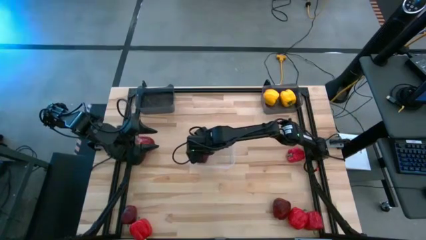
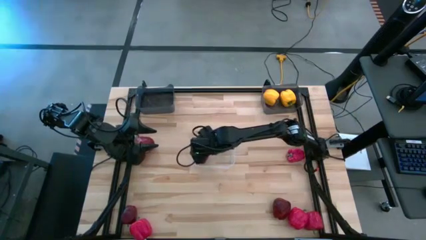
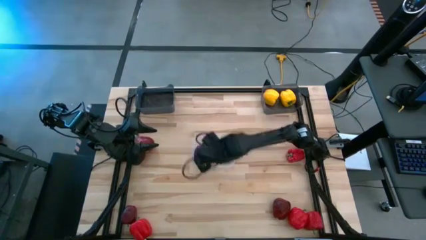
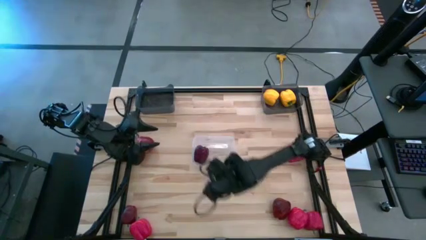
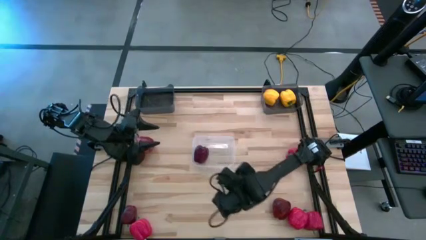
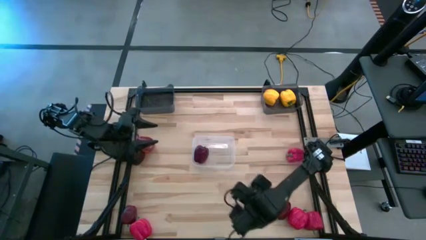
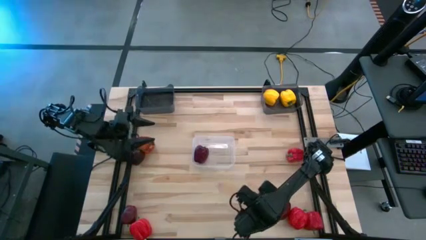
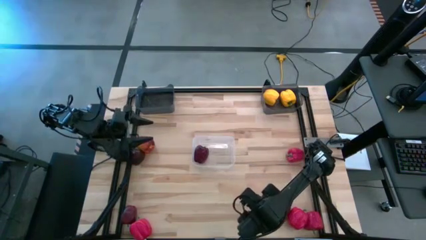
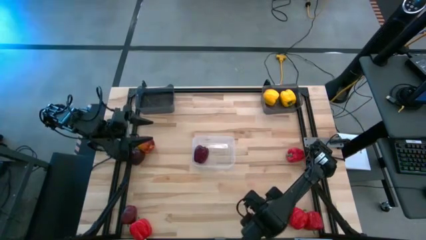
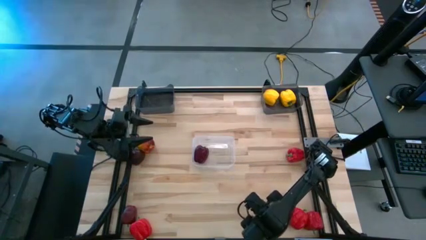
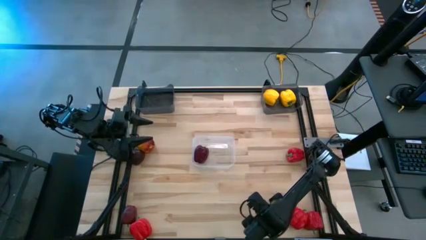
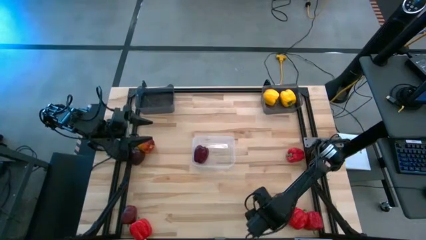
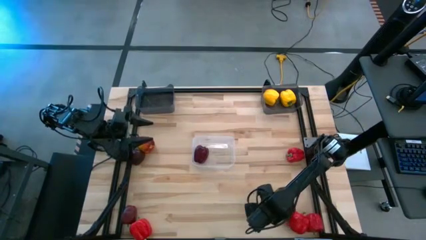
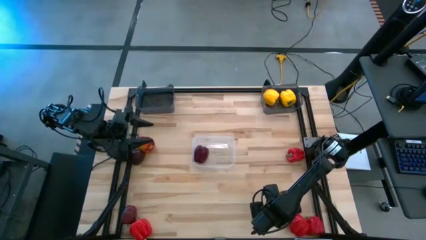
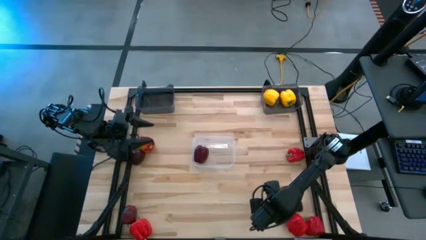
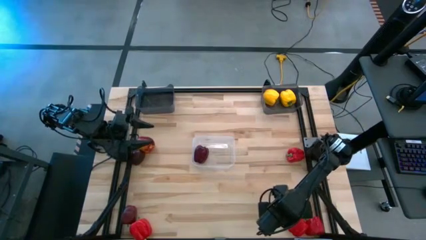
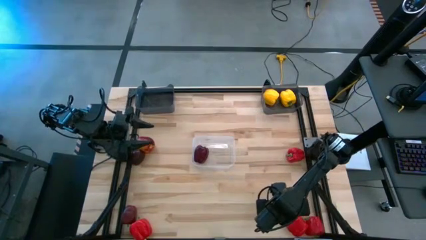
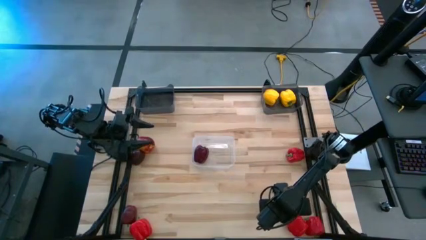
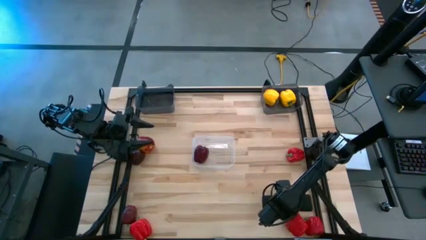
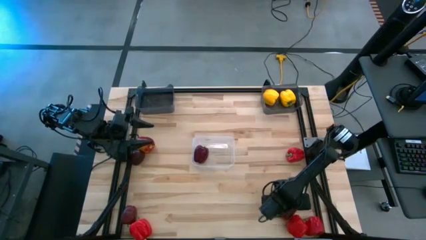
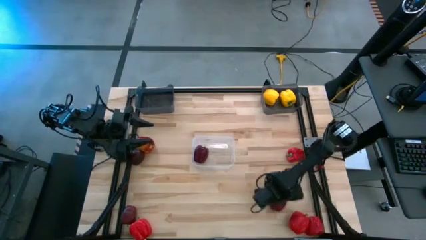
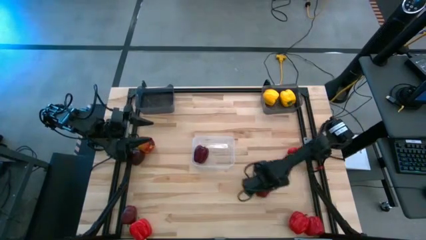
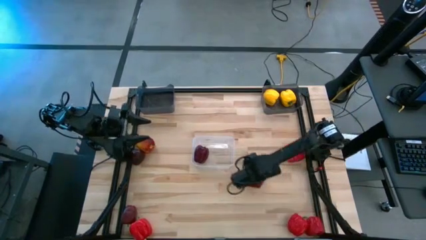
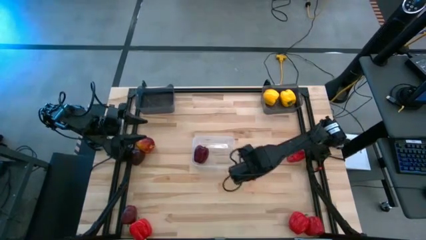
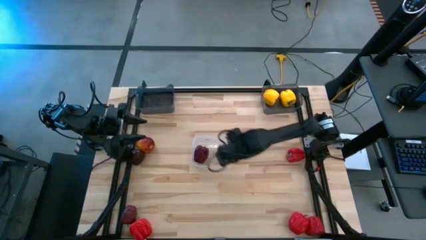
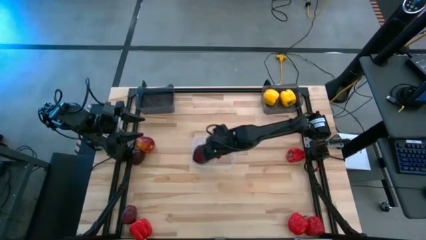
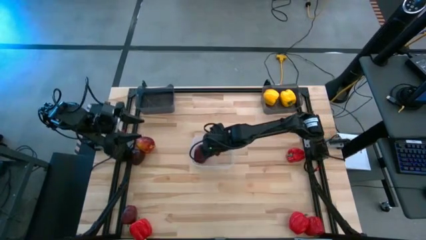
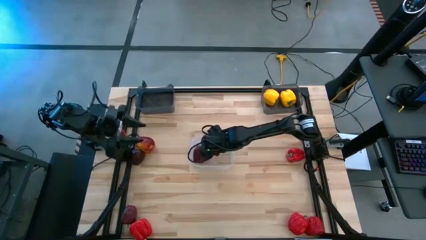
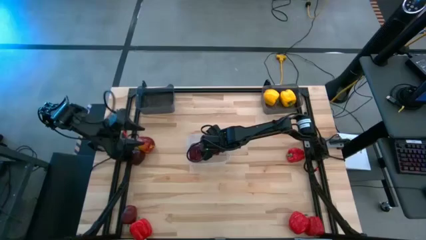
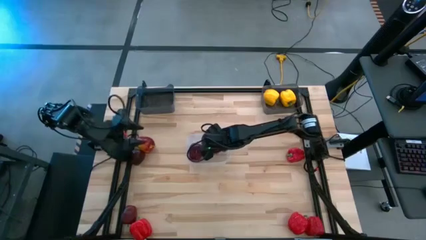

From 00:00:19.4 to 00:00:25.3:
Task: Sort produce into baskets
Put the red apple into the transparent bin

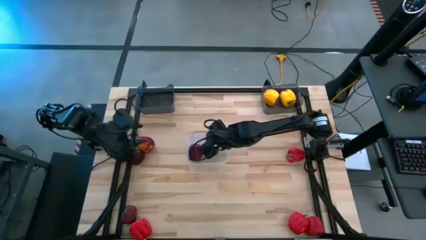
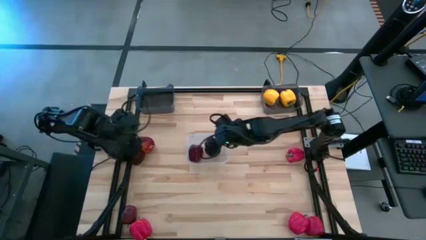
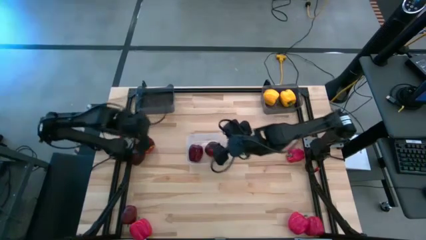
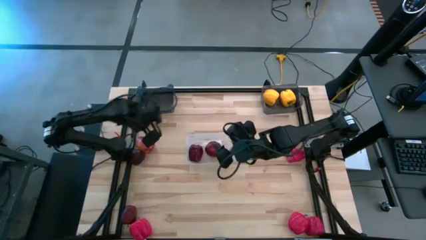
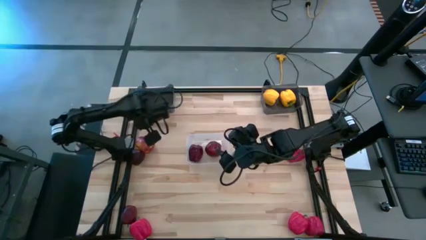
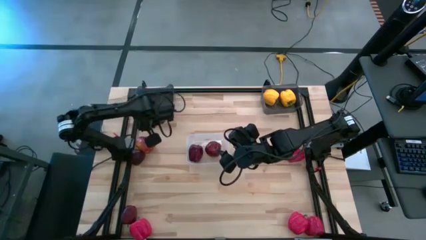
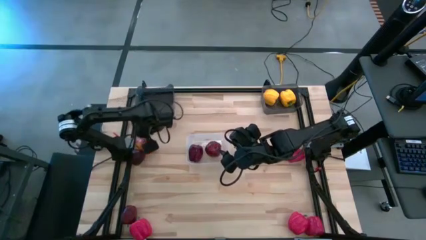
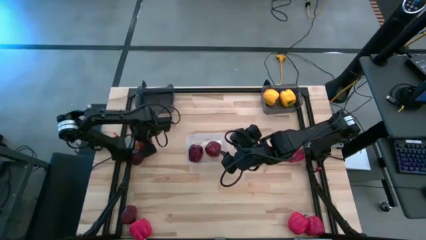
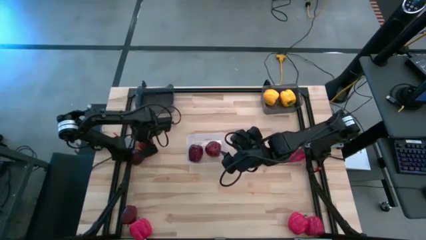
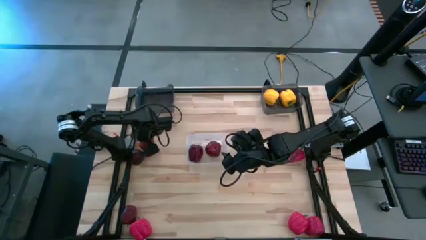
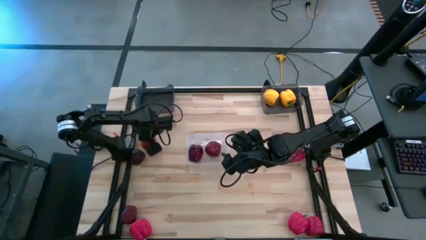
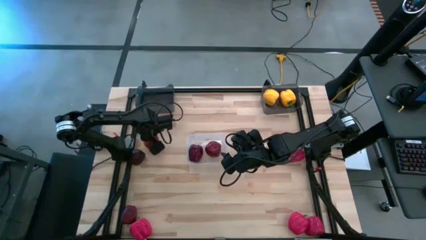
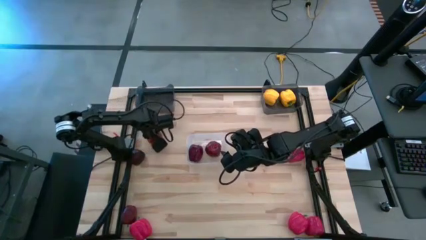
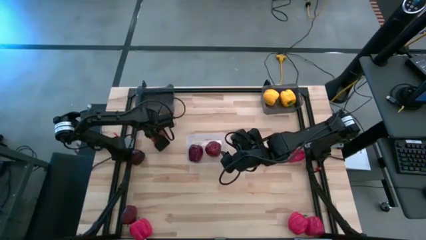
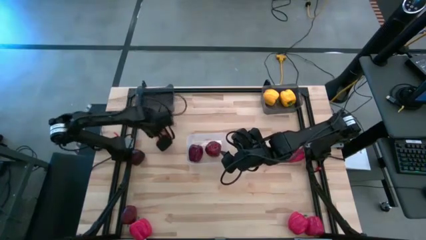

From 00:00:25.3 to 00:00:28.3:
Put the red apple into the transparent bin

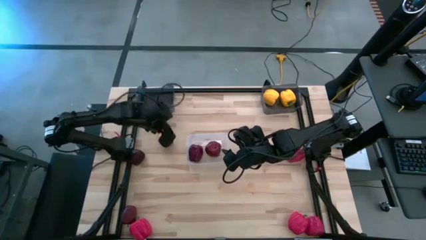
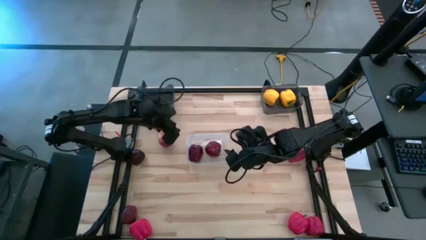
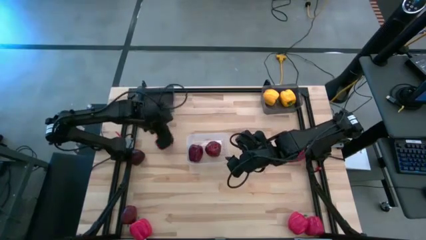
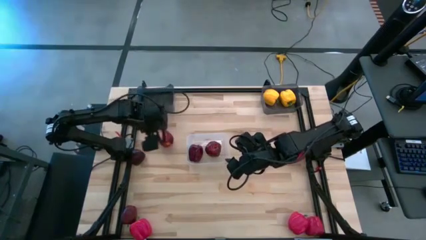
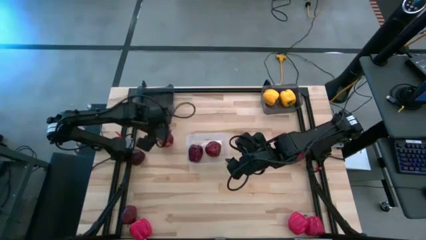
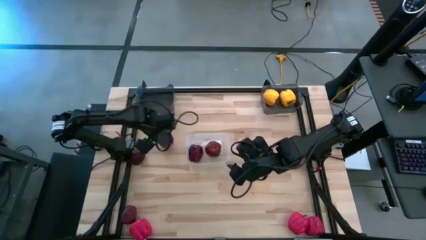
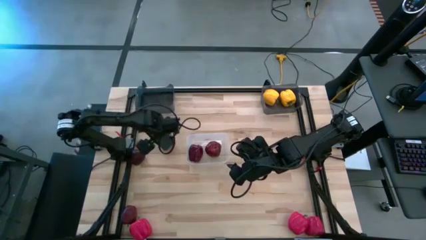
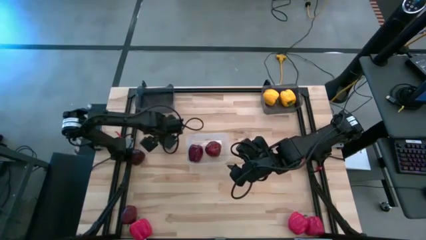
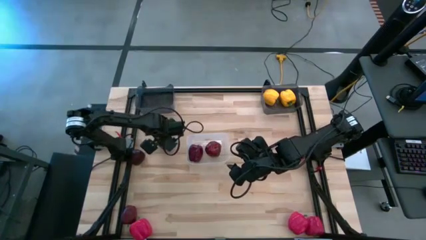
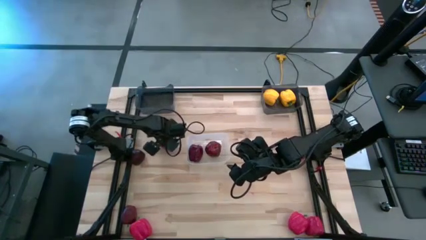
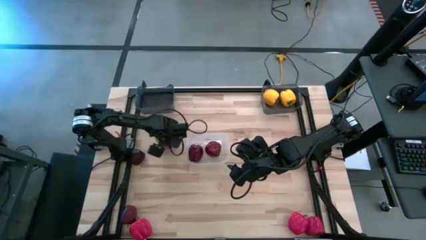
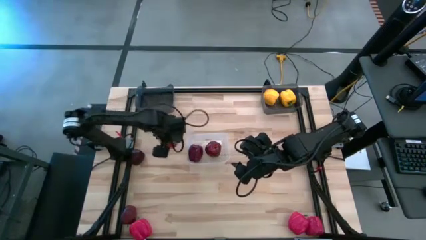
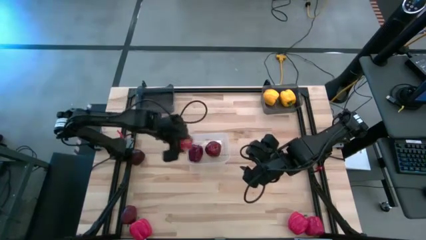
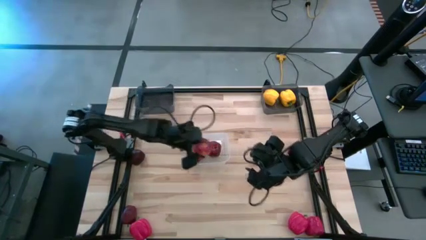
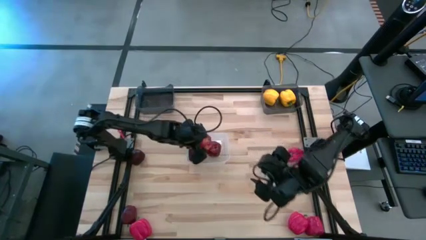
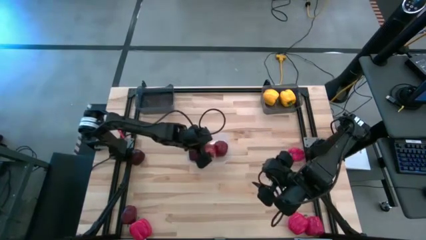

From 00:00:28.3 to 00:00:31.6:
Put the red apple into the transparent bin

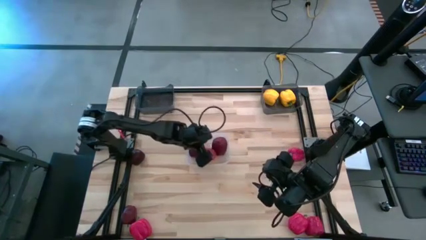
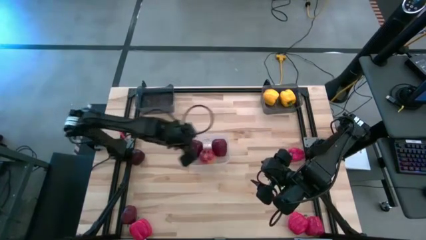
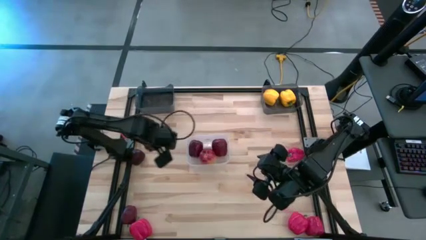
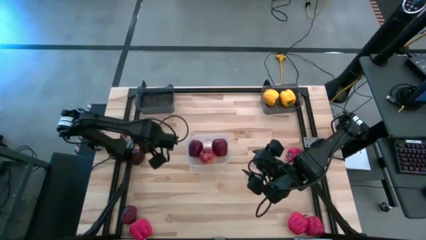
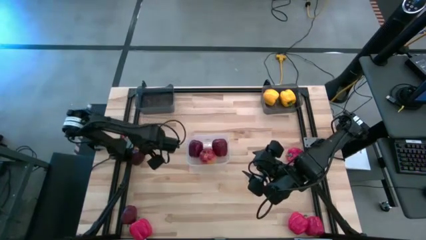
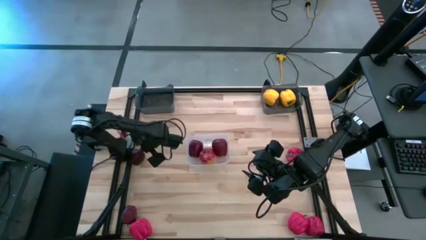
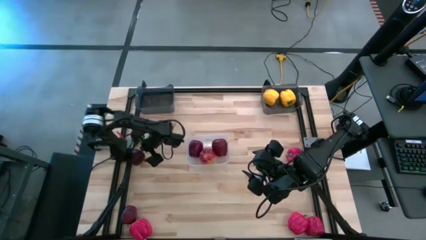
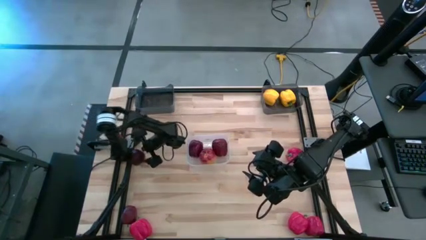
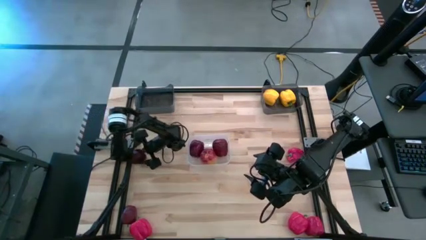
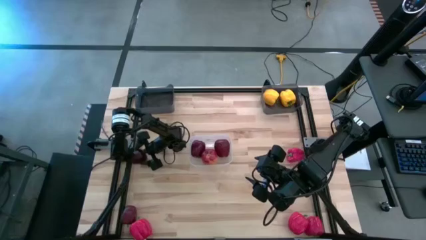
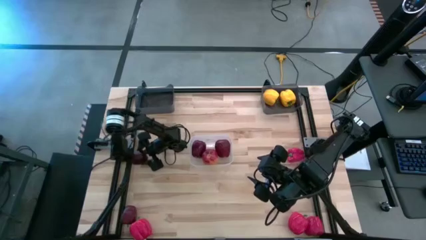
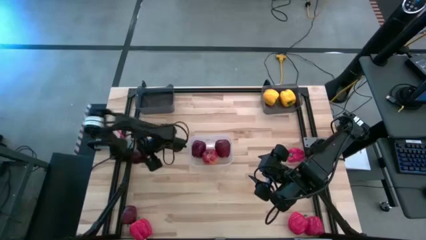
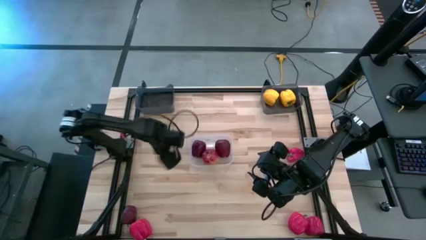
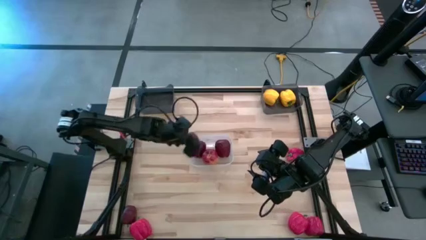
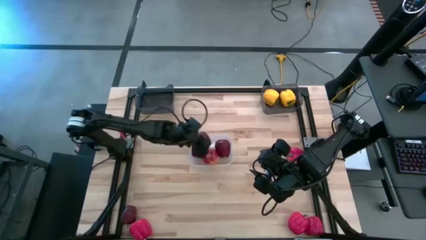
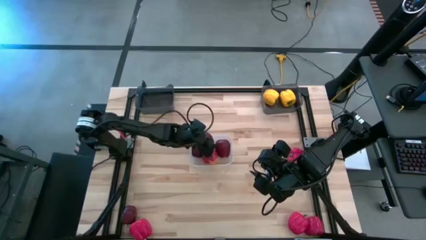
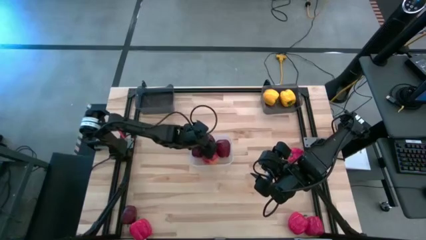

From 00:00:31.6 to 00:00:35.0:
Put the red apple into the transparent bin
